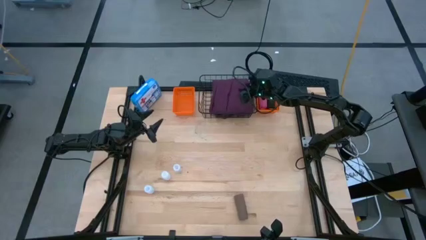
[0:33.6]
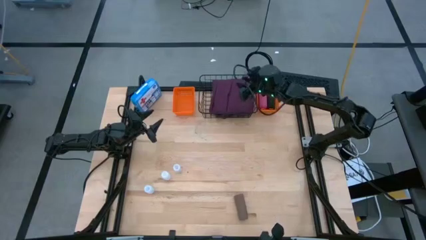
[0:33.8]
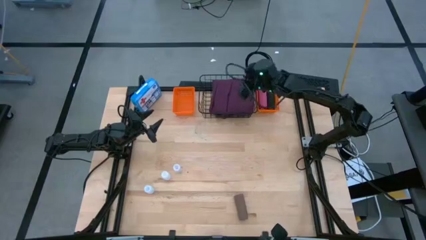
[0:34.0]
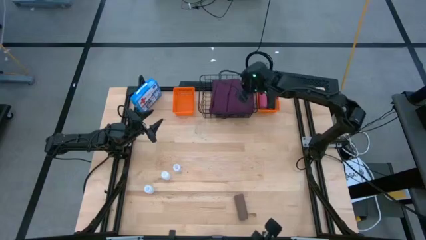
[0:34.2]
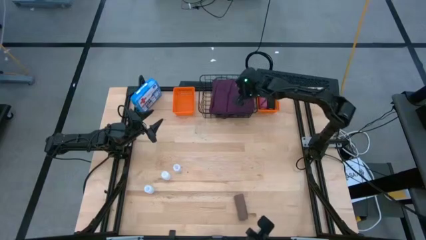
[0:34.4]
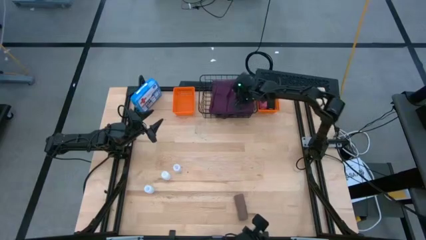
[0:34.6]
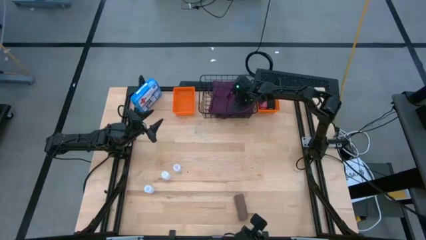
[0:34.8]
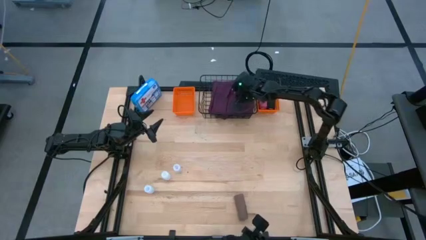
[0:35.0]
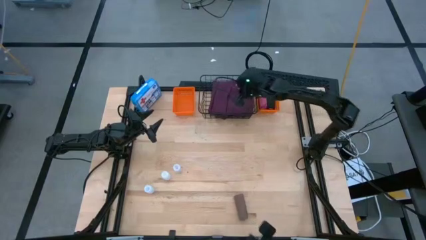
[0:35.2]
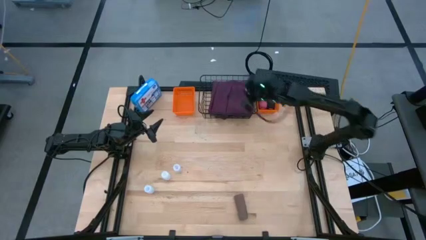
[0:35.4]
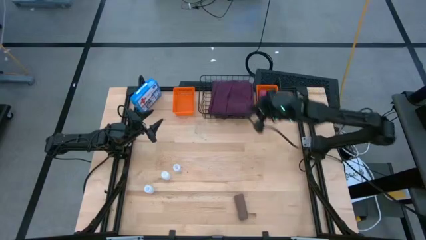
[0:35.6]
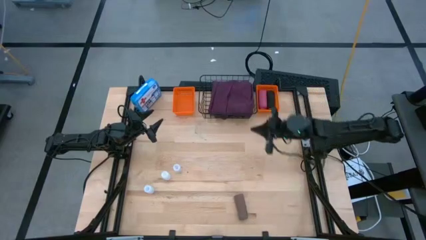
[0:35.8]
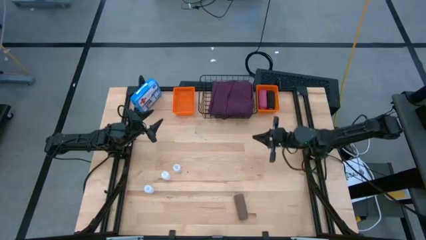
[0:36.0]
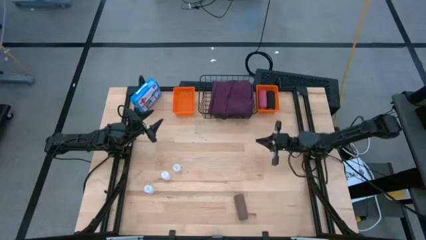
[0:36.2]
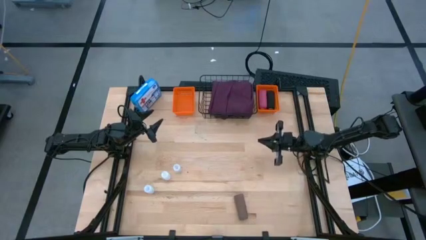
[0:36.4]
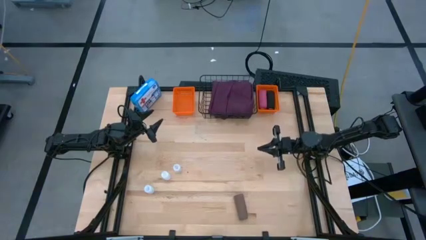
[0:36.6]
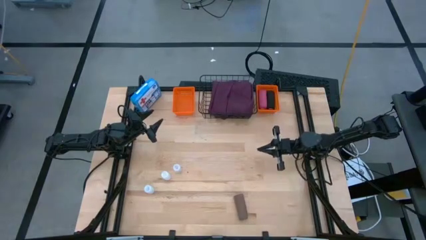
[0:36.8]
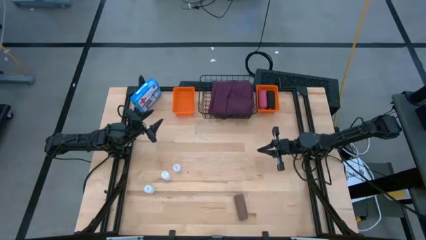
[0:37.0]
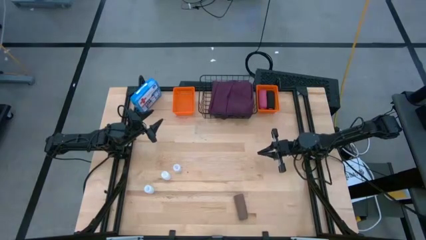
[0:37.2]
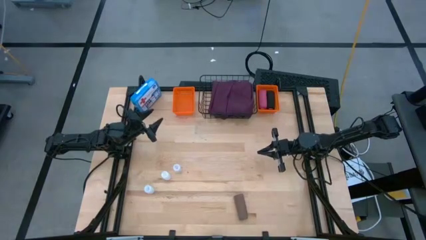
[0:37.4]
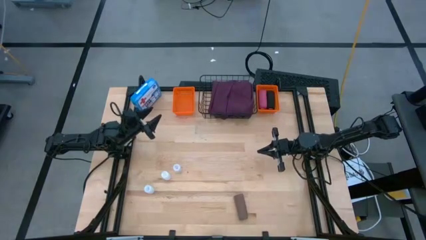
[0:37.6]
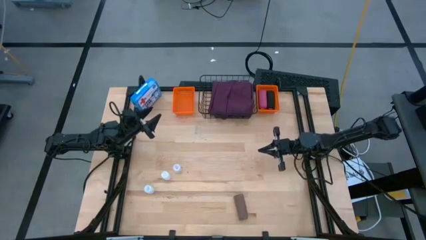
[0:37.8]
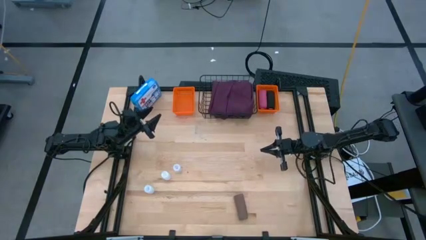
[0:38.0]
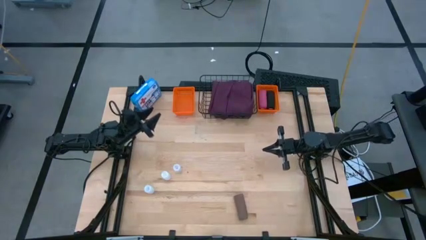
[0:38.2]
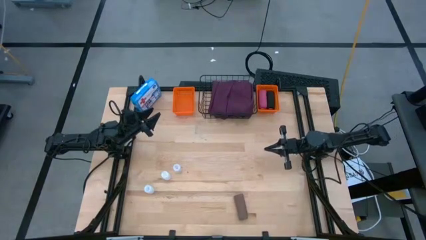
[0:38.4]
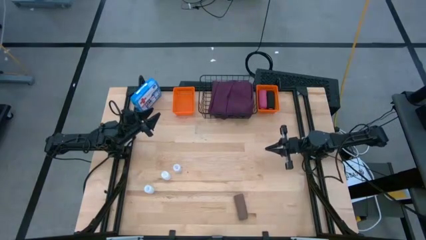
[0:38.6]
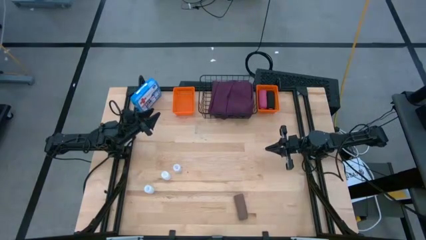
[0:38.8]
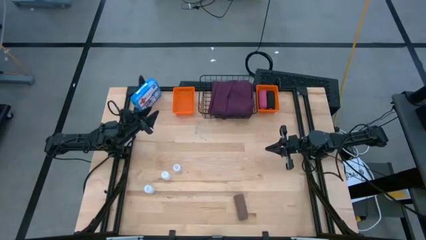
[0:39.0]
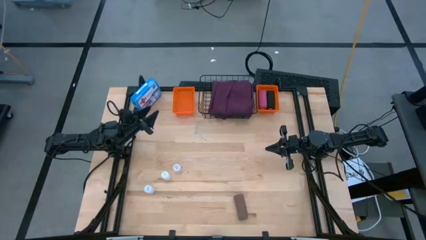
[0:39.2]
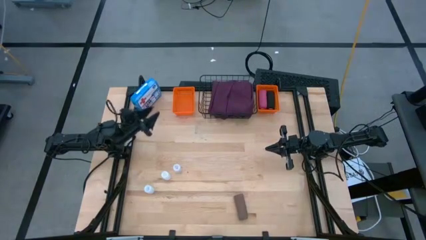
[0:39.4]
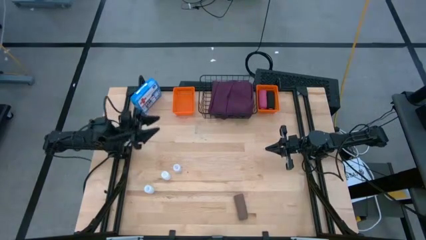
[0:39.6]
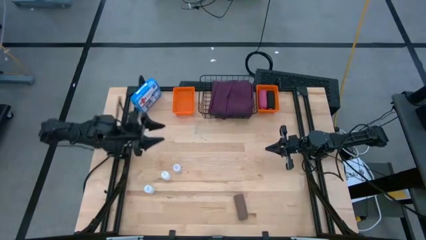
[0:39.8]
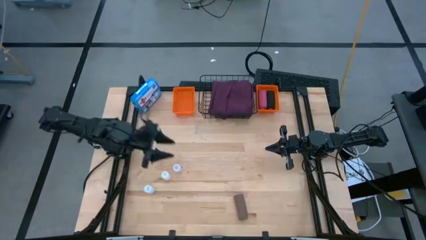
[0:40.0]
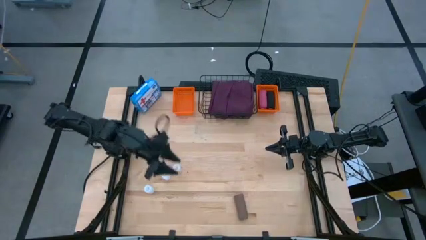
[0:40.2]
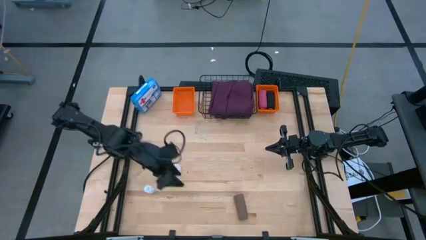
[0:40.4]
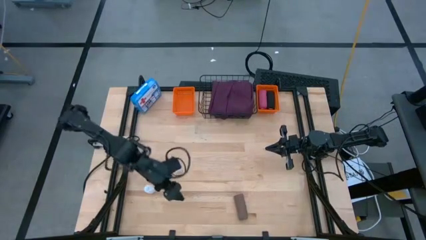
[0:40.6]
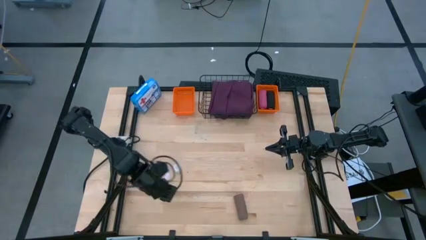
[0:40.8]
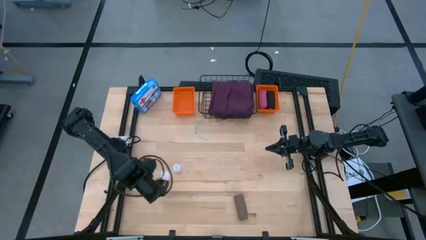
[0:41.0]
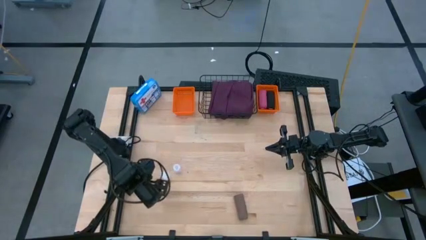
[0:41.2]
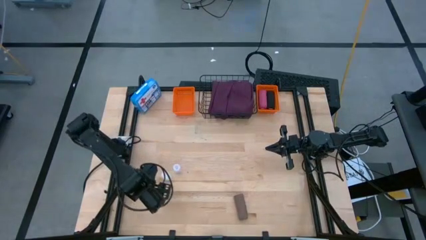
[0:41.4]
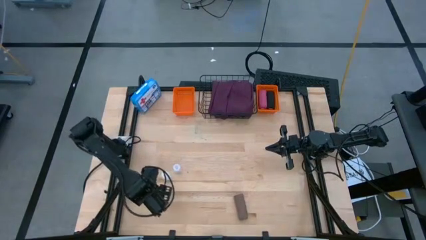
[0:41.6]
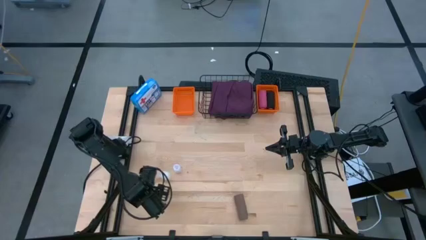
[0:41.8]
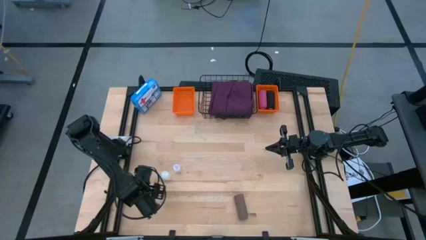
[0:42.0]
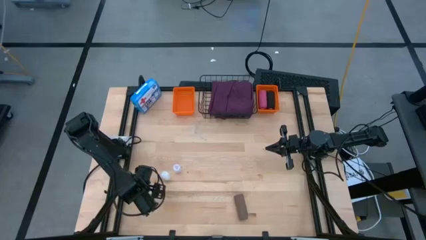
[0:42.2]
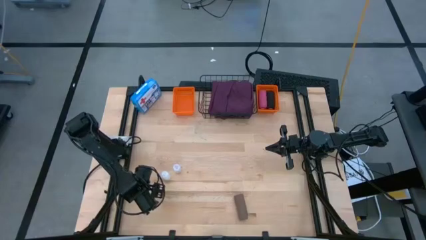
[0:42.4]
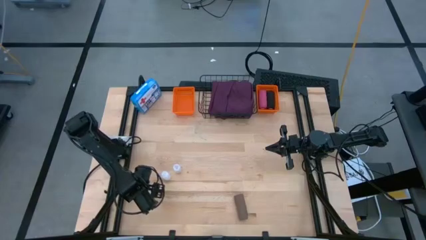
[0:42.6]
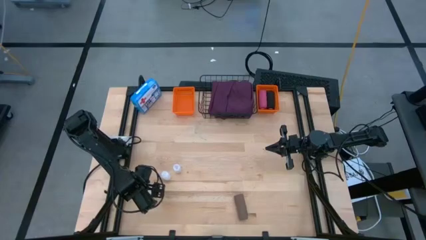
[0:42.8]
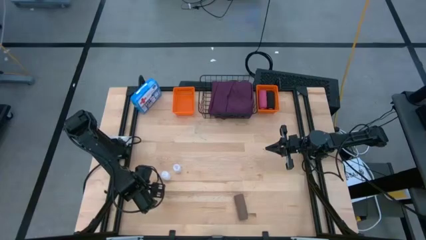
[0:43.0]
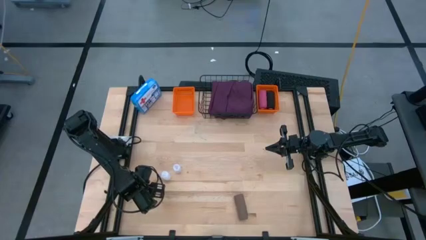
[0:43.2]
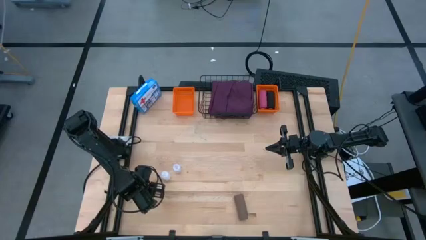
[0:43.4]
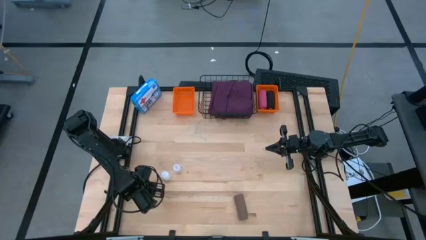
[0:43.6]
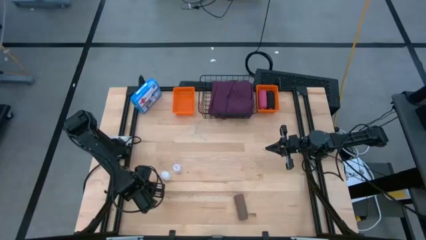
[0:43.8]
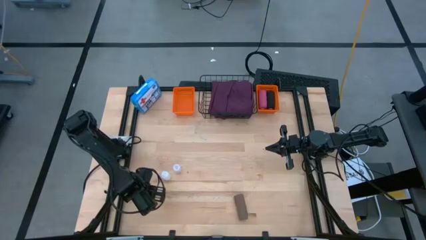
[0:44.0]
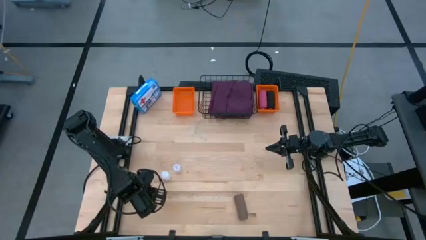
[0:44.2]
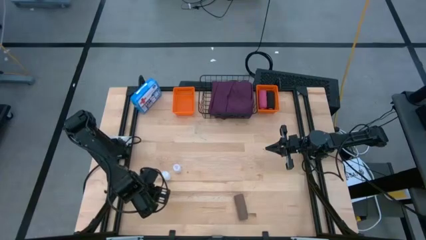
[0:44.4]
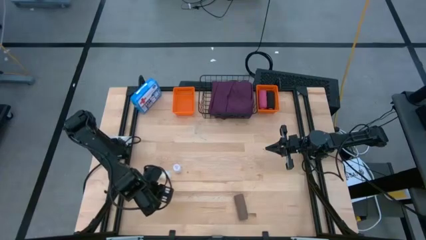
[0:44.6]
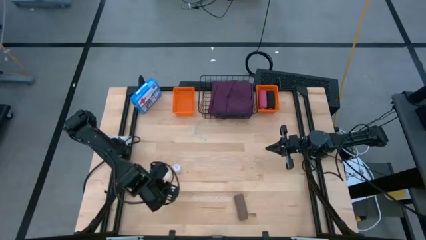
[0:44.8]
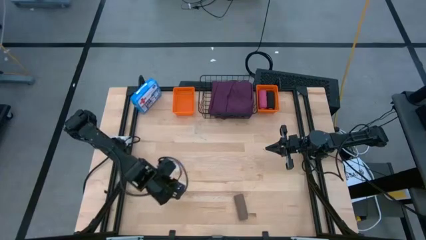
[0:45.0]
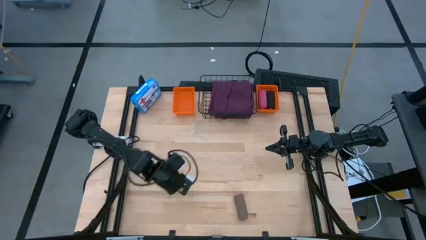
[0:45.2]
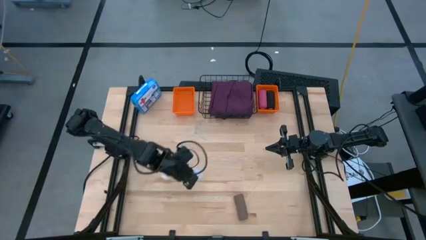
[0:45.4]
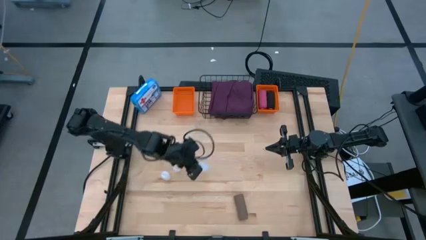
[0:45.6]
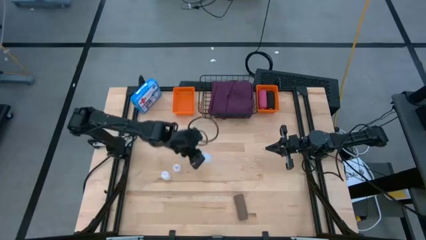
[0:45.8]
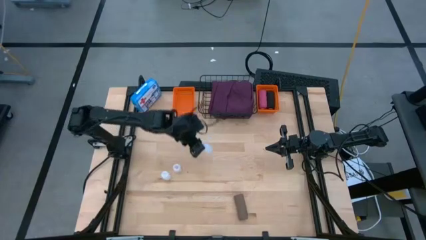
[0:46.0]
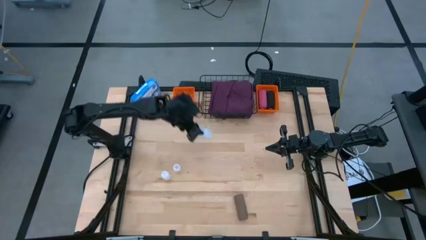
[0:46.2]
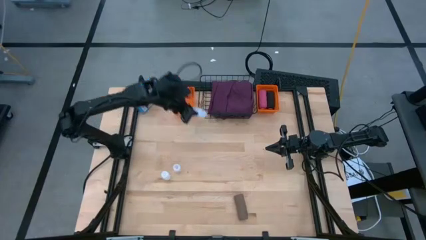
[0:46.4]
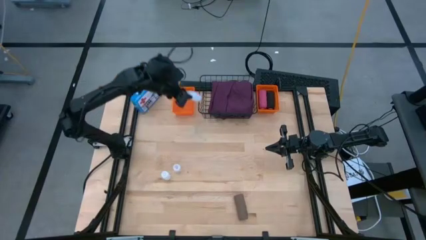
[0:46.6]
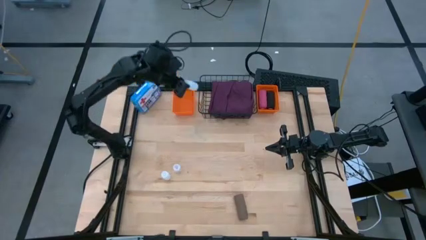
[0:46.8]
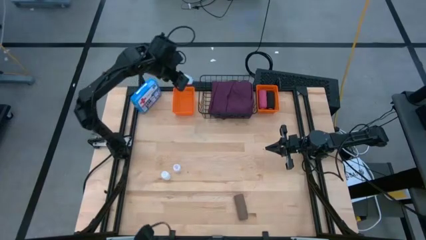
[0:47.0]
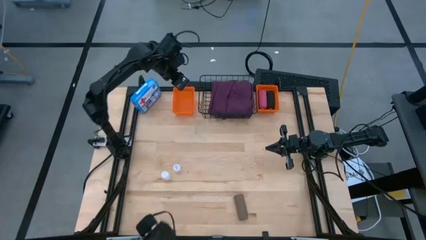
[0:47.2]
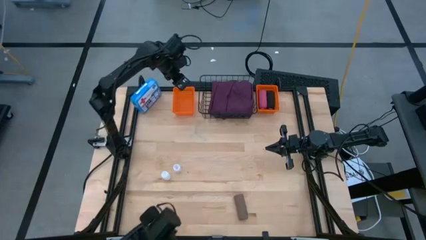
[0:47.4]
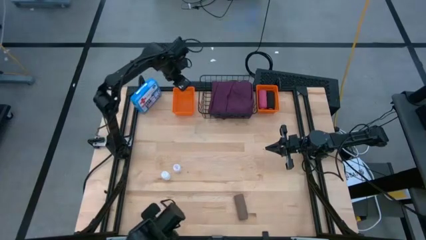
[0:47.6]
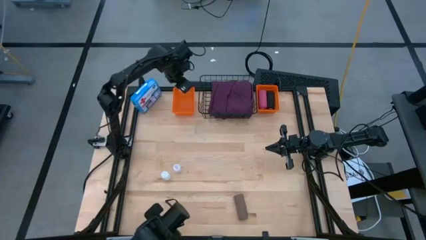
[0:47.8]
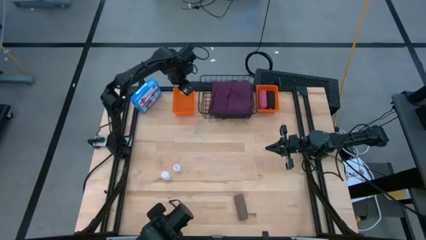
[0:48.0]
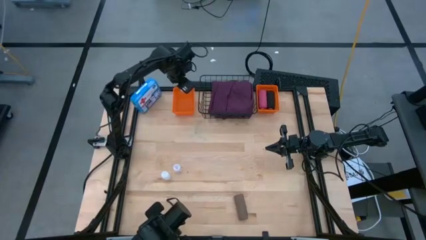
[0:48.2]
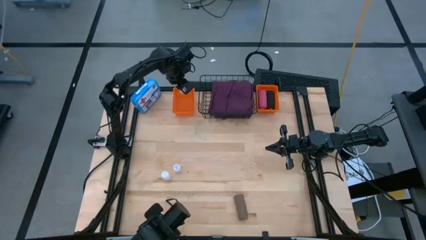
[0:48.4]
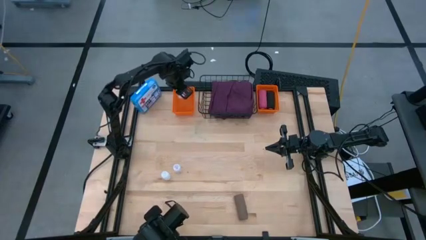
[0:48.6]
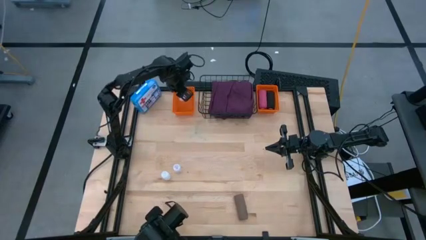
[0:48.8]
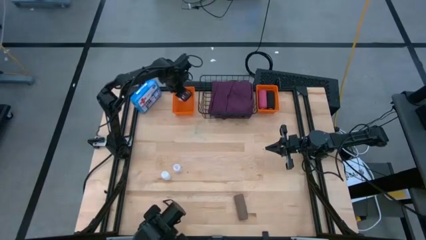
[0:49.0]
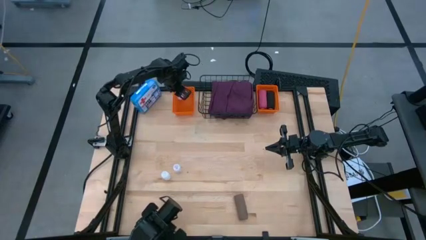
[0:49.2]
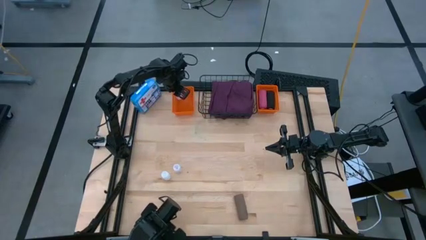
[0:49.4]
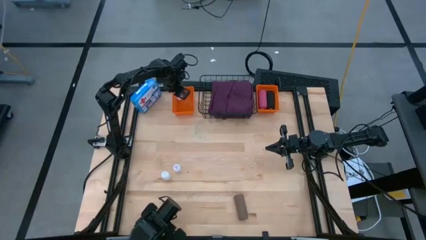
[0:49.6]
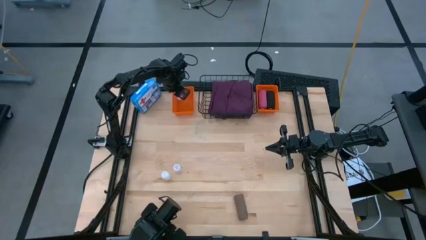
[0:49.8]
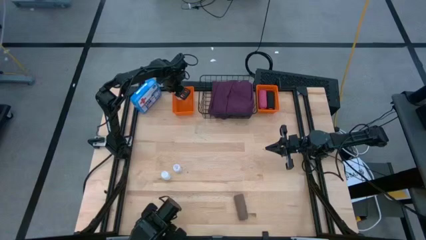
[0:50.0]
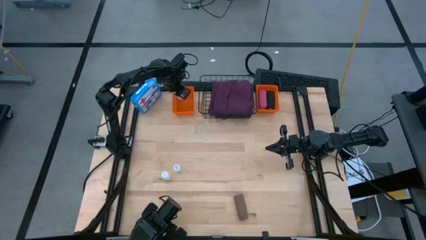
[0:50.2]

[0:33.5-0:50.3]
Task: Pick & place medical supplies in basket/bin
Put the bottom white pill bottle into the left orange bin
